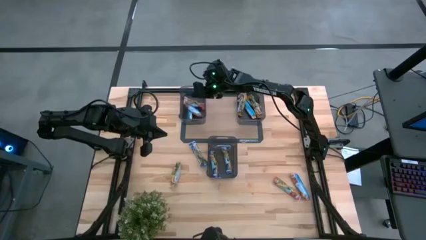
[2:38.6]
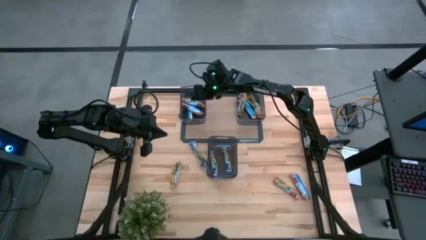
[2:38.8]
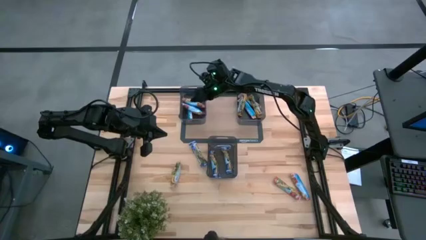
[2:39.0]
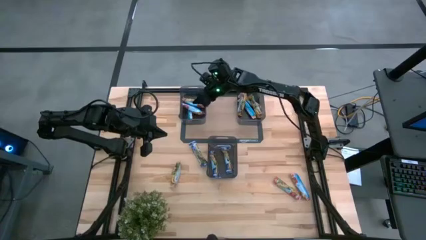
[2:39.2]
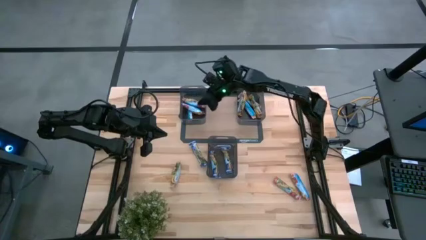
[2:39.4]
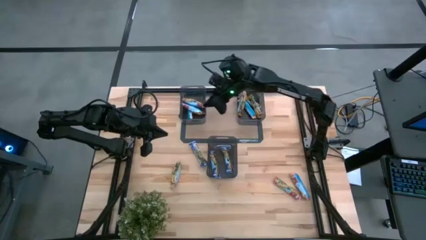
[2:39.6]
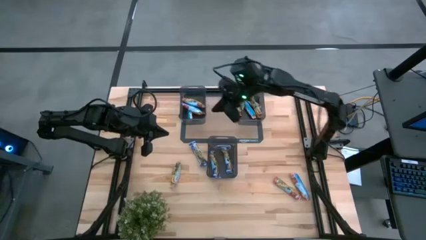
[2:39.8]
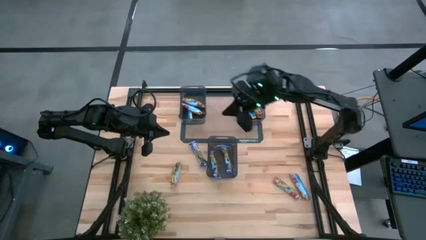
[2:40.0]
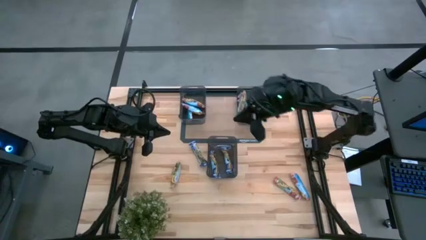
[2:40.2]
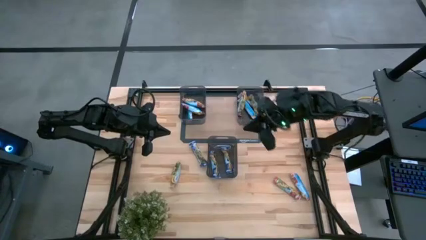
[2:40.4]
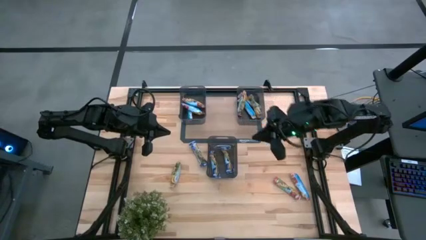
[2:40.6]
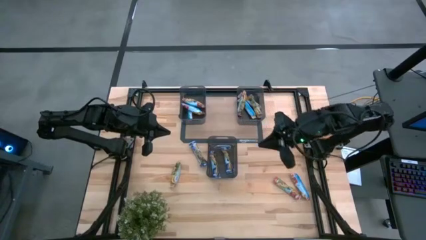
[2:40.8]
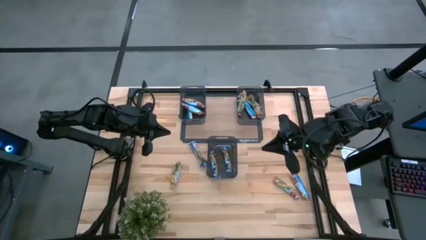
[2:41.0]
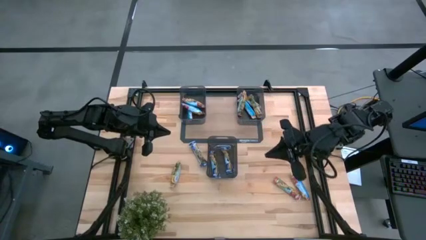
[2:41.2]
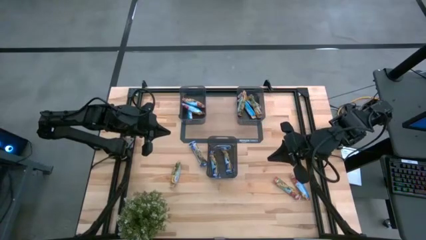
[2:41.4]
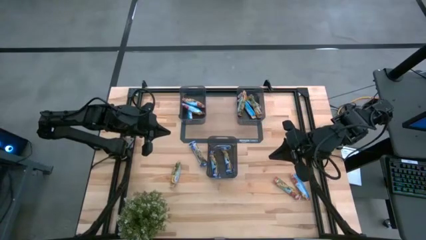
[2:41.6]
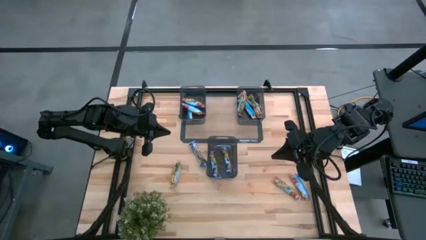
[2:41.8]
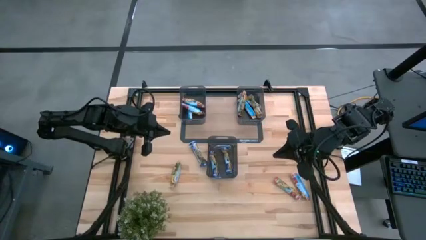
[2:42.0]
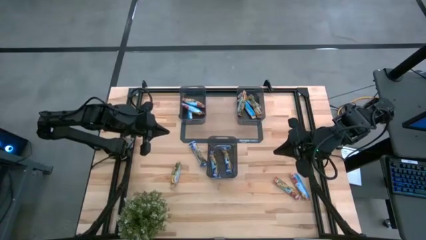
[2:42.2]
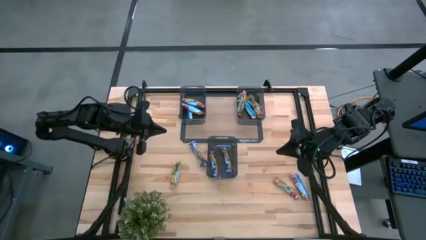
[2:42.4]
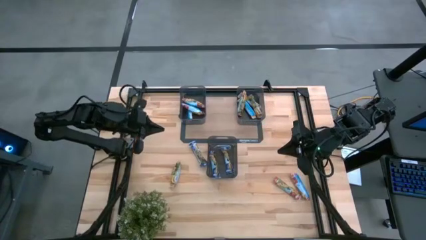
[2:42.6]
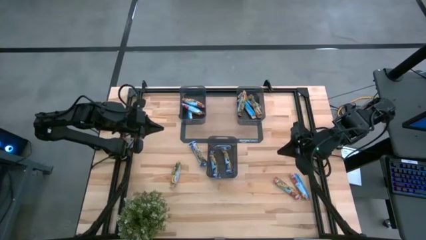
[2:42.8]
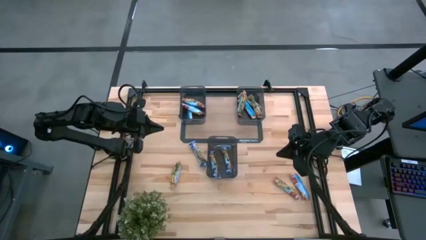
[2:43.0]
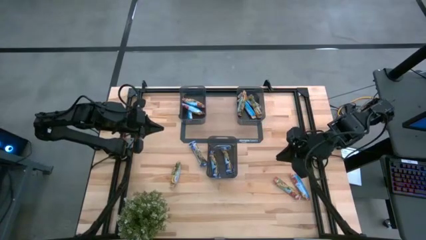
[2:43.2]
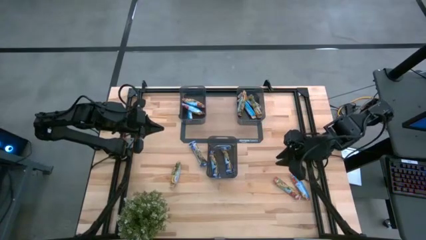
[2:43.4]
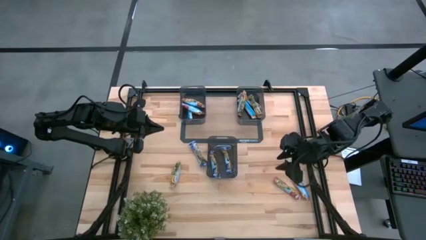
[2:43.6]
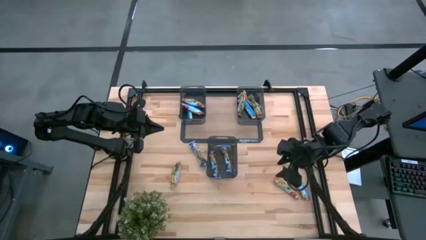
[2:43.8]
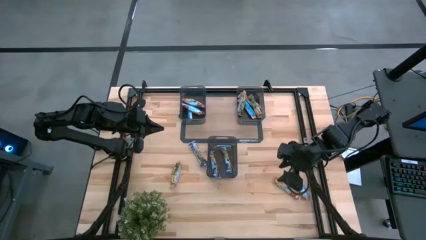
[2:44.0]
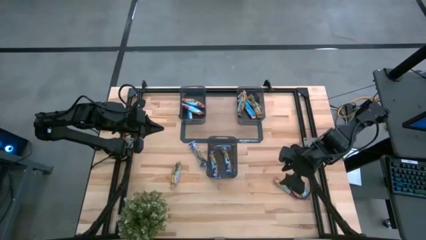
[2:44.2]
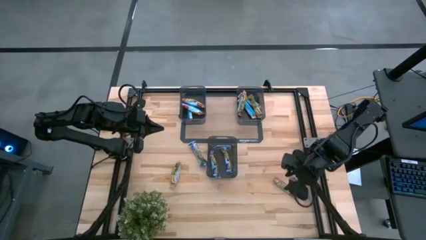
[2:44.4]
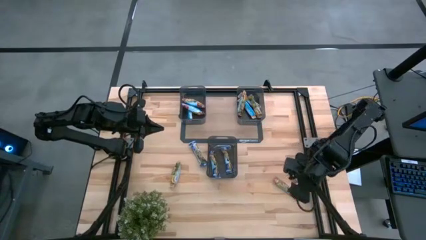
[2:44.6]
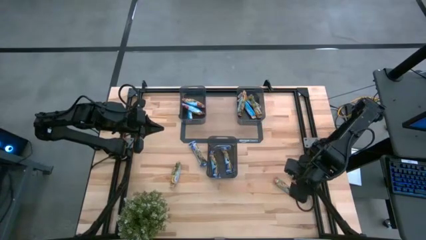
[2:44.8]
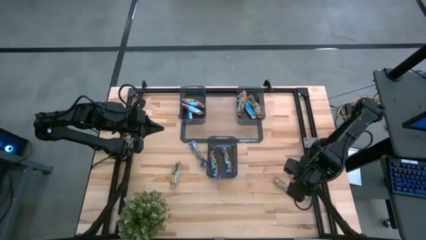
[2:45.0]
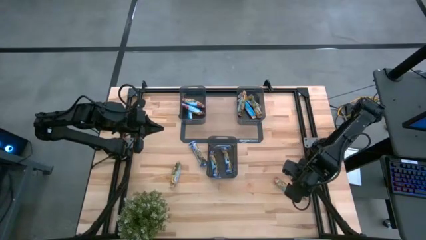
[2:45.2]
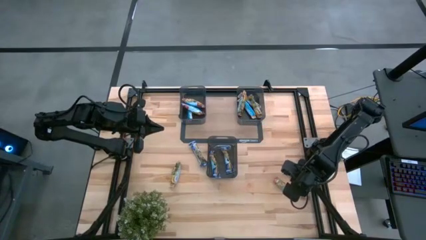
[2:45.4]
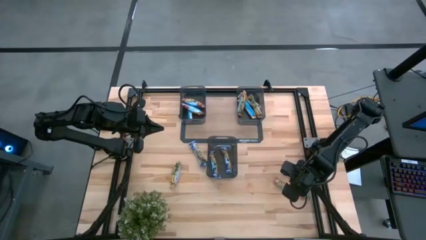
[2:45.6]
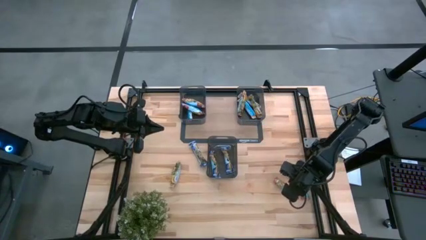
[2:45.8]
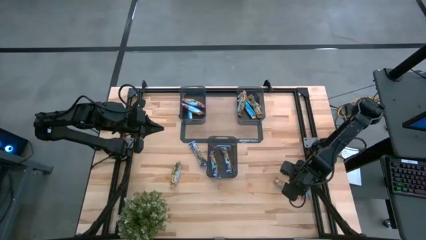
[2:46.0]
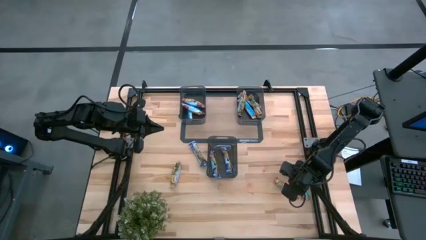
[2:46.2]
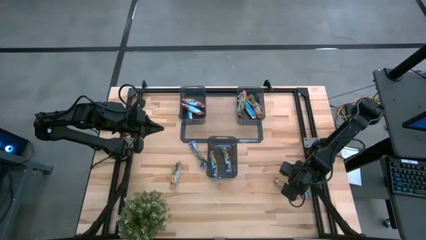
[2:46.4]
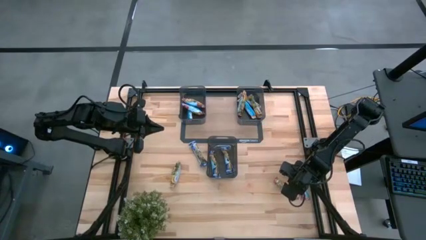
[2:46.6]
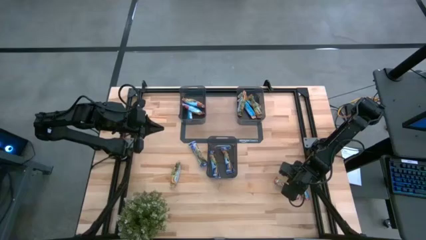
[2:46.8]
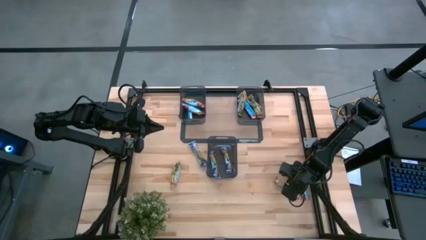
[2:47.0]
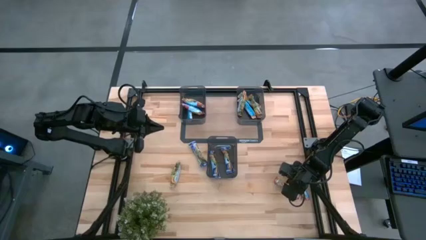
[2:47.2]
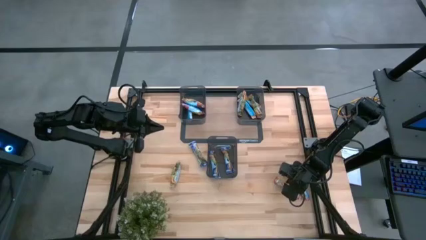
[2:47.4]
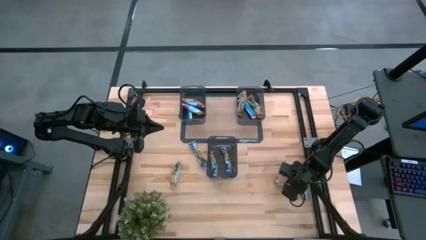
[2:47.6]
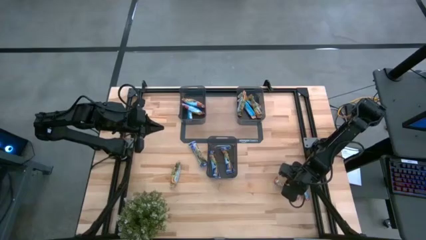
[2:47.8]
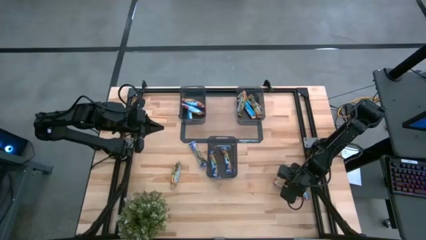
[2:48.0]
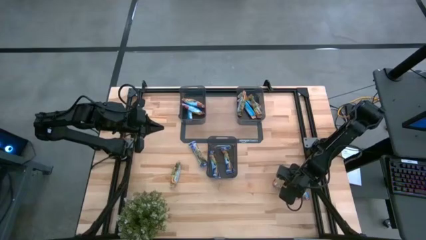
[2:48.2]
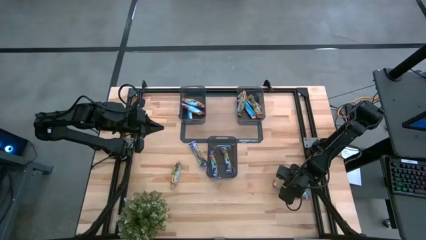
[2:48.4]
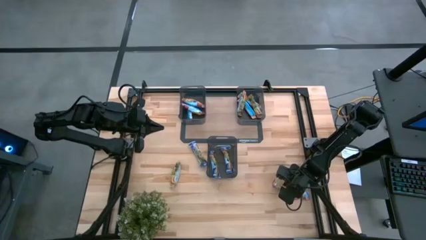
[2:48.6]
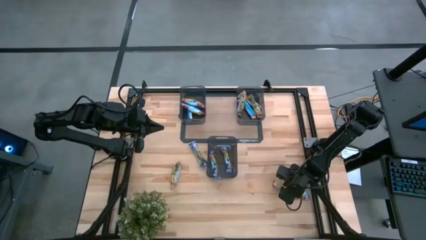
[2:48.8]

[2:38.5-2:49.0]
Task: Pick and place Granola Bars by type
Put the red granola bar into the left black bin

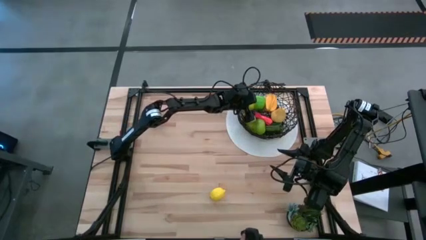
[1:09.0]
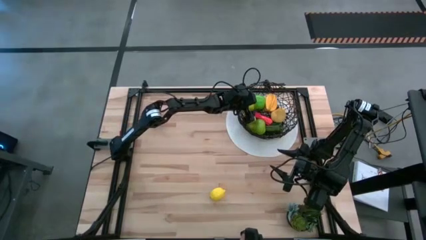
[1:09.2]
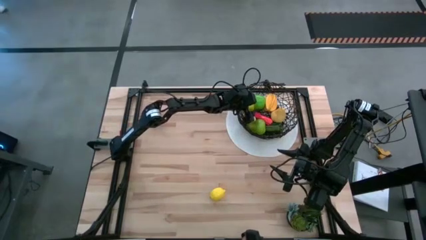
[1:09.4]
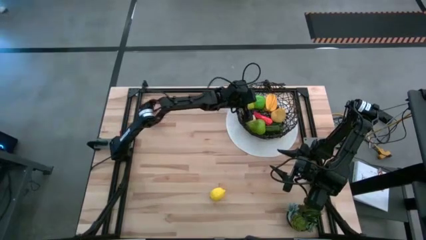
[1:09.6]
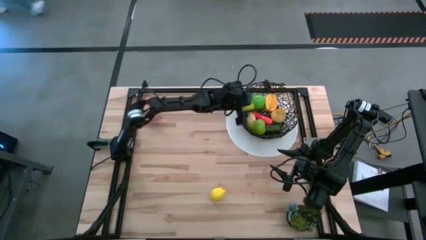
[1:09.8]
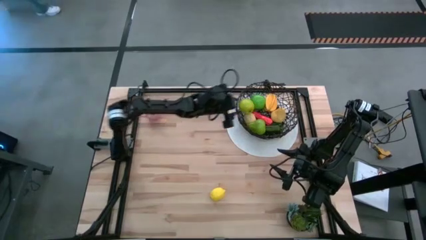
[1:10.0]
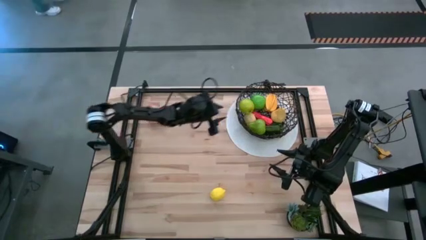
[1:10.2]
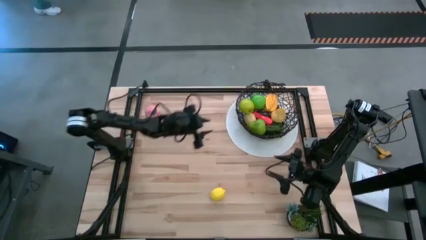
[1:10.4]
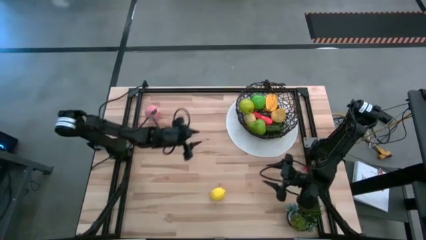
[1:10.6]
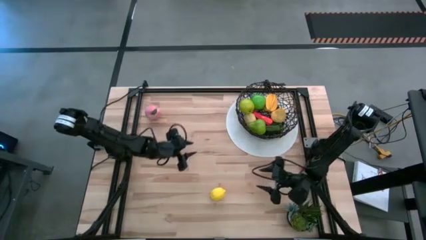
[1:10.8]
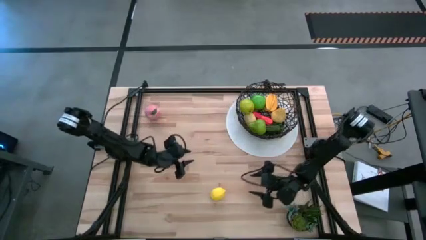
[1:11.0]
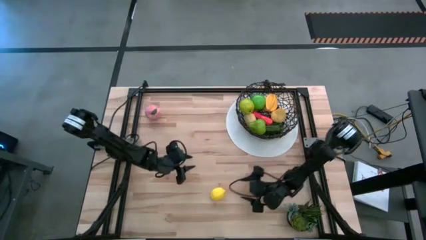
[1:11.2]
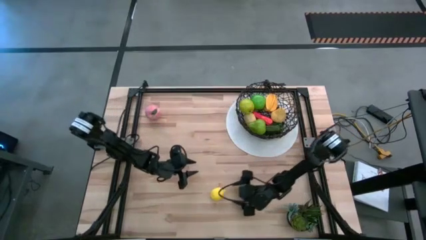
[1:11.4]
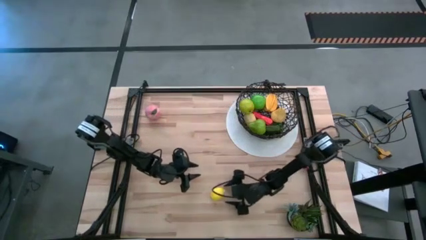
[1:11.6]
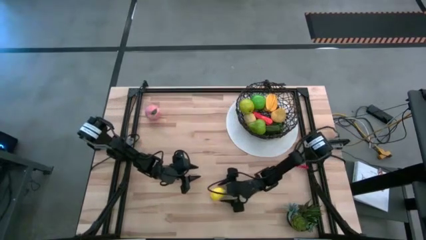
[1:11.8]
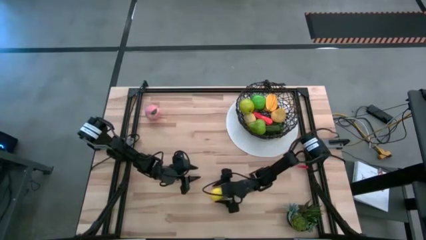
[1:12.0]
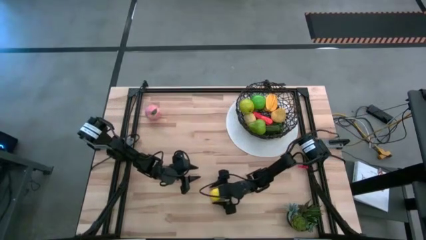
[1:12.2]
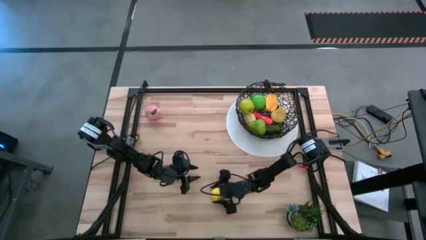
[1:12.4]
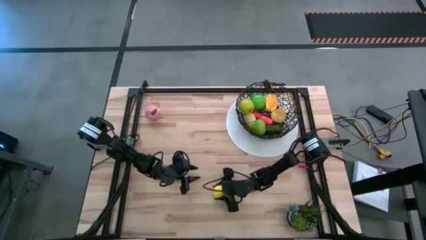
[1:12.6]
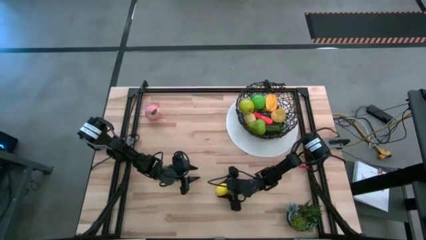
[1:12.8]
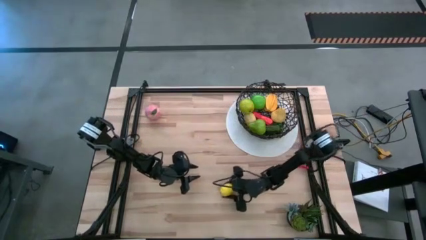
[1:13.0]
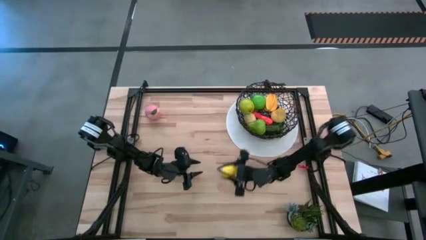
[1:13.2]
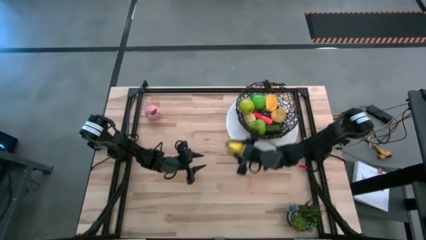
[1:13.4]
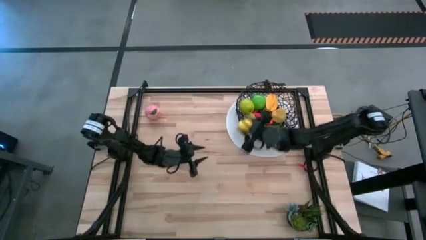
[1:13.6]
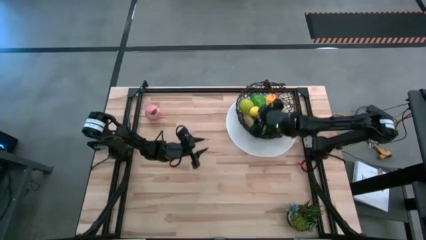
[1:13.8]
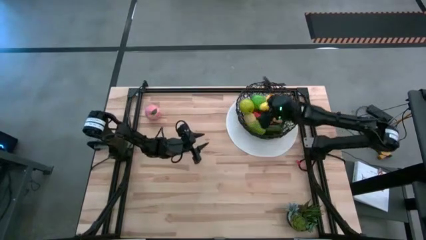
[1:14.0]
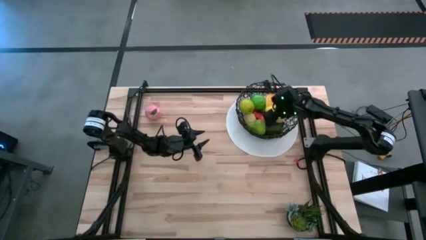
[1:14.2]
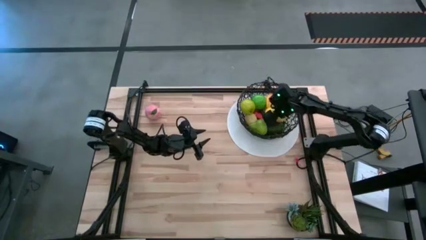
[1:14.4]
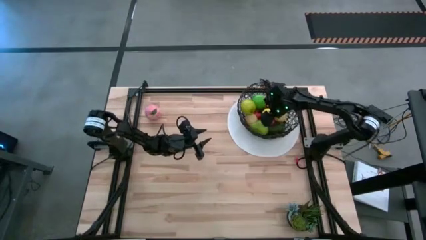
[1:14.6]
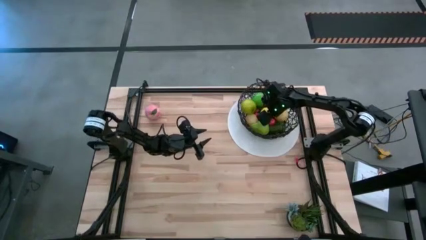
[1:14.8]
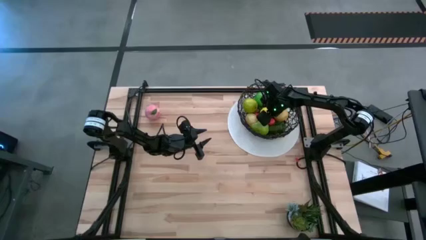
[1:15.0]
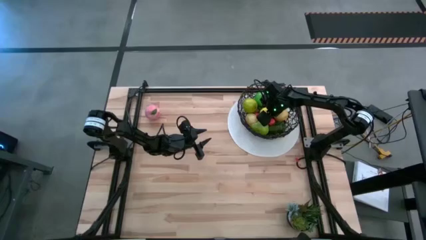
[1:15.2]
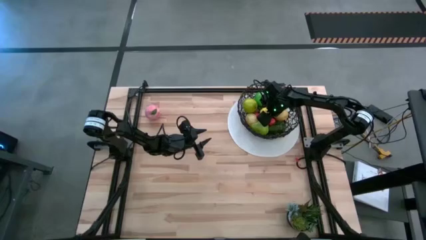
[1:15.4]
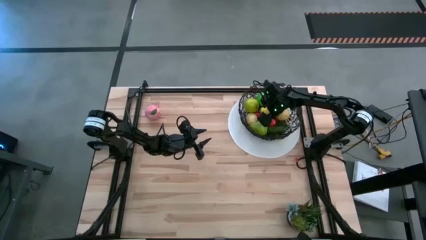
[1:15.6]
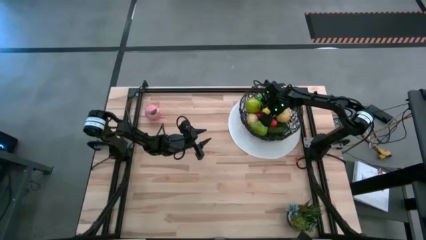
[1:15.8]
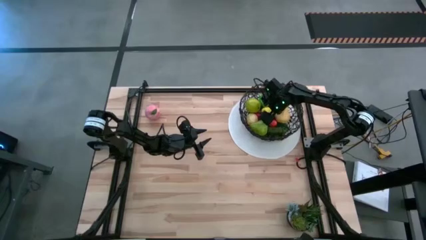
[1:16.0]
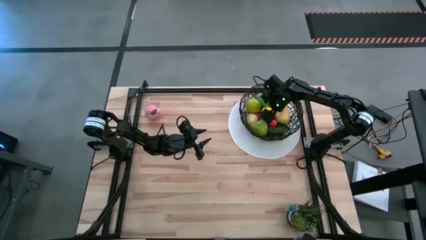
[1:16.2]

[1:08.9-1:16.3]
Task: Build produce basket
Put the yellow lemon into the black wire basket
